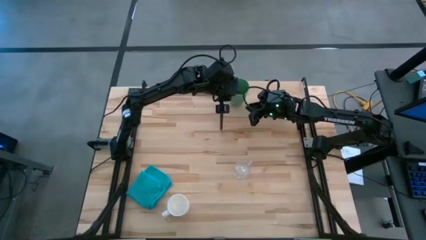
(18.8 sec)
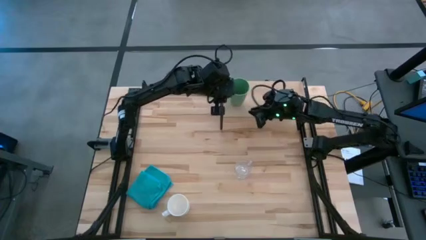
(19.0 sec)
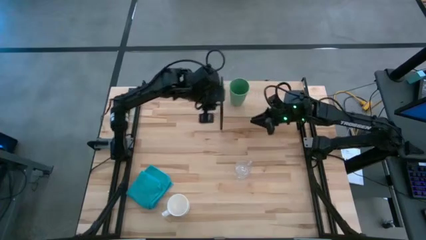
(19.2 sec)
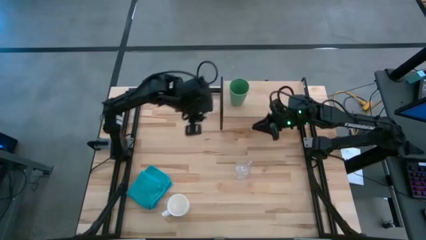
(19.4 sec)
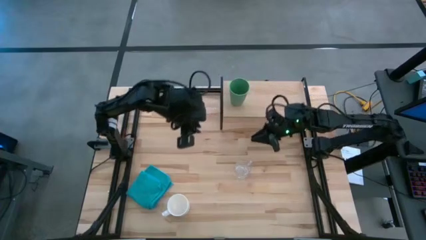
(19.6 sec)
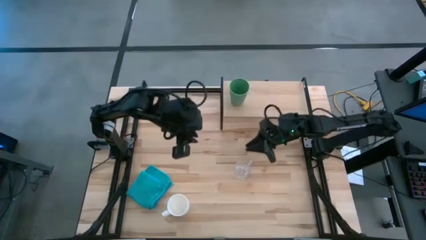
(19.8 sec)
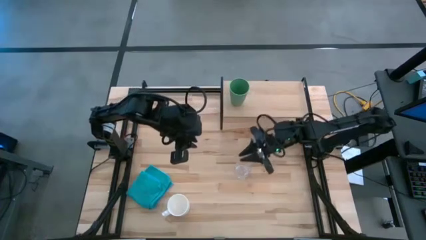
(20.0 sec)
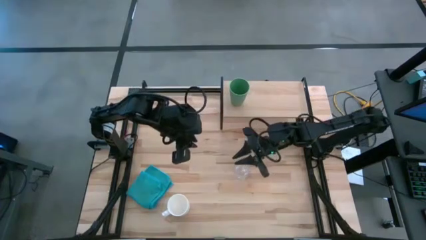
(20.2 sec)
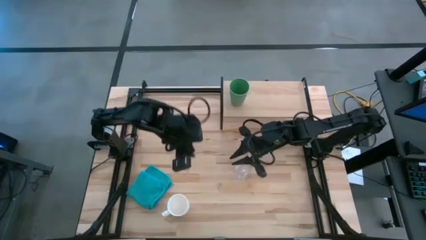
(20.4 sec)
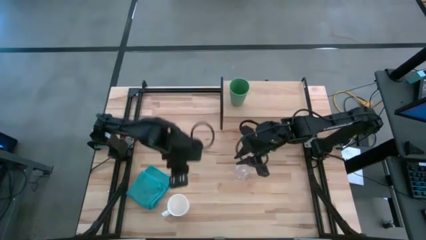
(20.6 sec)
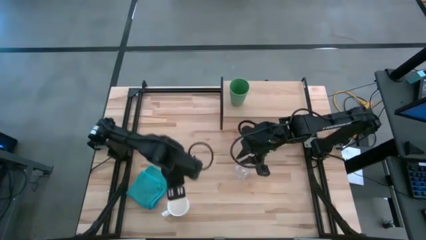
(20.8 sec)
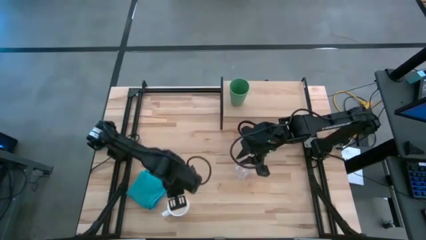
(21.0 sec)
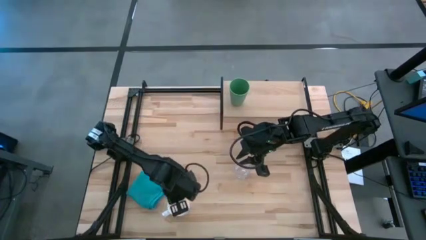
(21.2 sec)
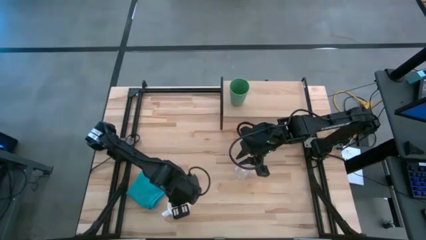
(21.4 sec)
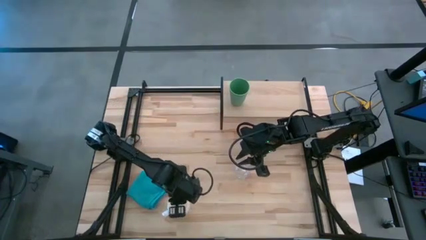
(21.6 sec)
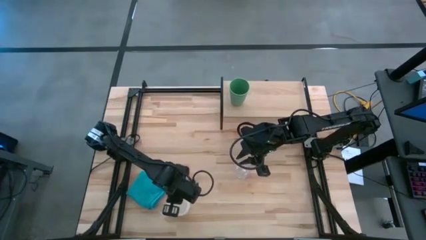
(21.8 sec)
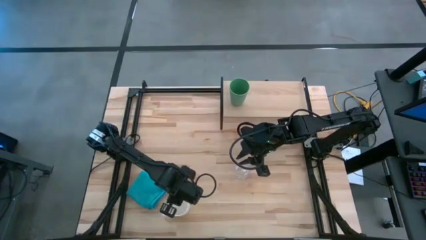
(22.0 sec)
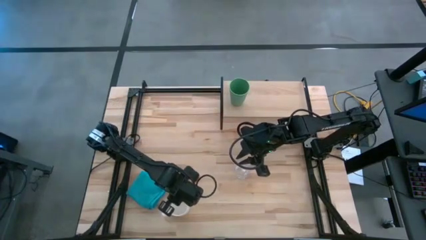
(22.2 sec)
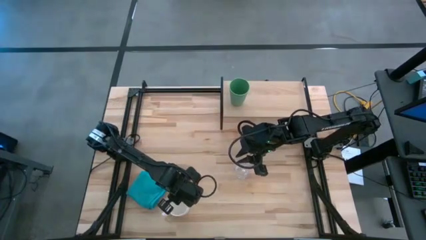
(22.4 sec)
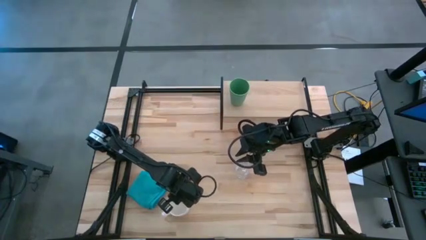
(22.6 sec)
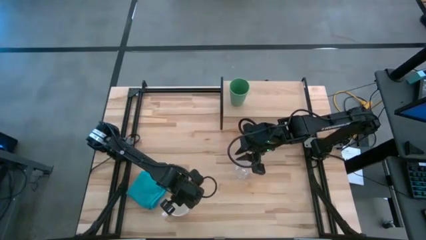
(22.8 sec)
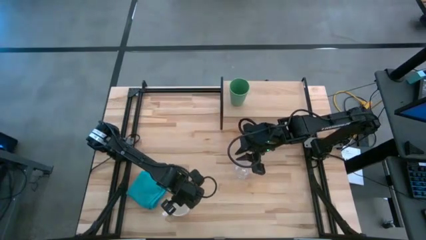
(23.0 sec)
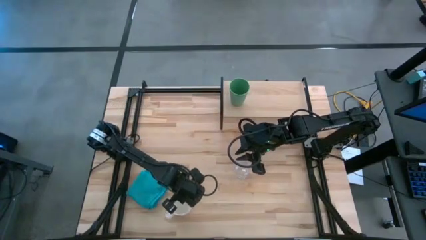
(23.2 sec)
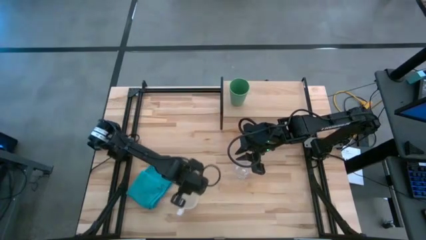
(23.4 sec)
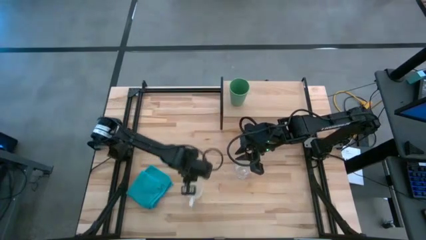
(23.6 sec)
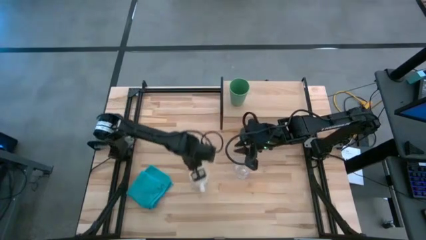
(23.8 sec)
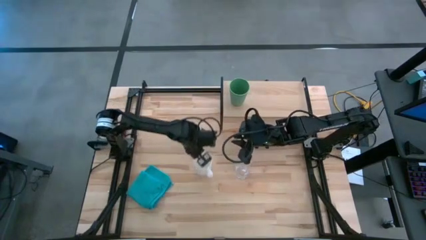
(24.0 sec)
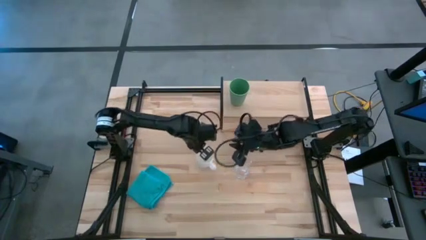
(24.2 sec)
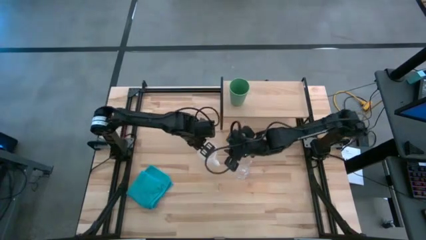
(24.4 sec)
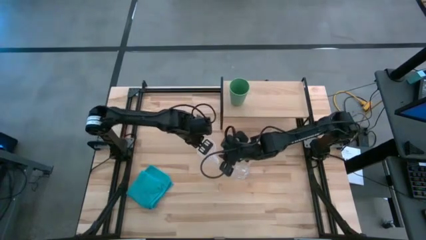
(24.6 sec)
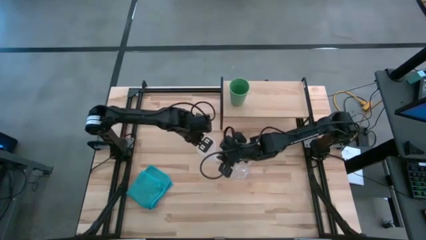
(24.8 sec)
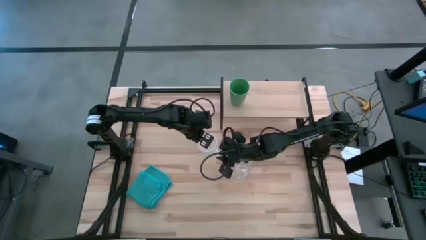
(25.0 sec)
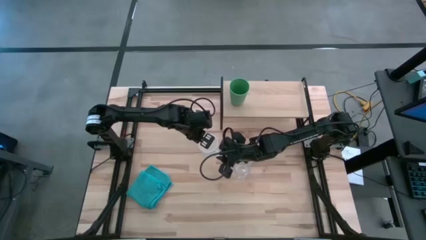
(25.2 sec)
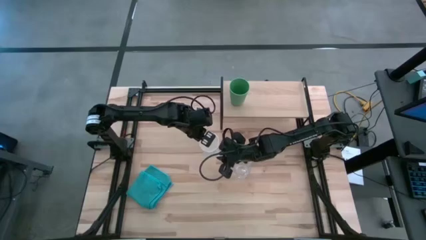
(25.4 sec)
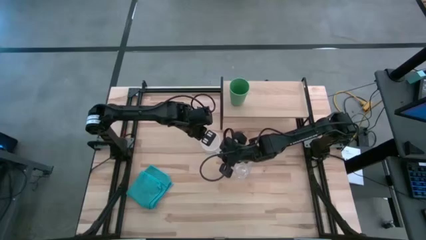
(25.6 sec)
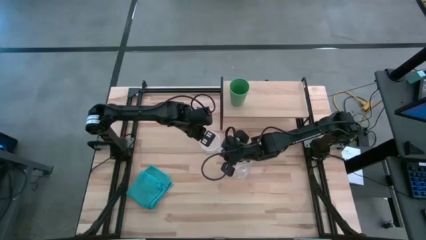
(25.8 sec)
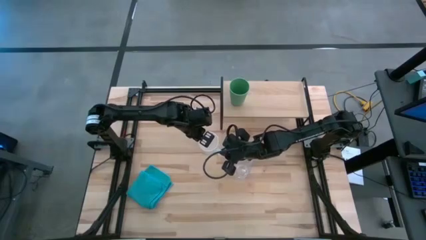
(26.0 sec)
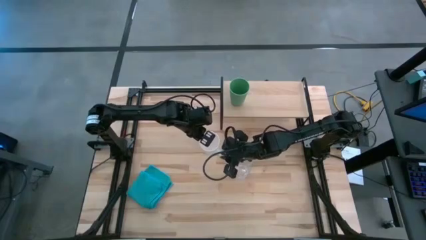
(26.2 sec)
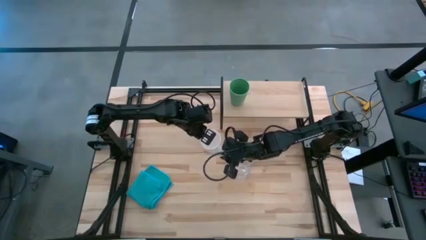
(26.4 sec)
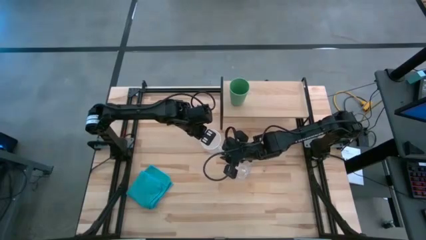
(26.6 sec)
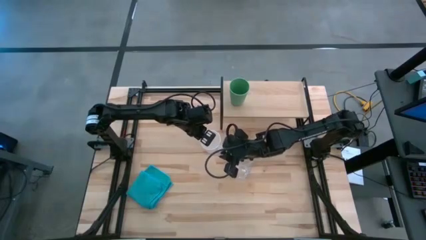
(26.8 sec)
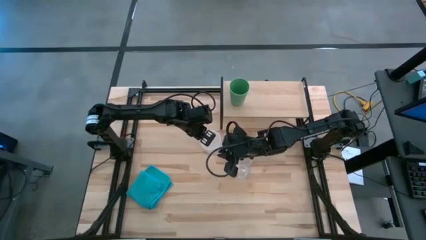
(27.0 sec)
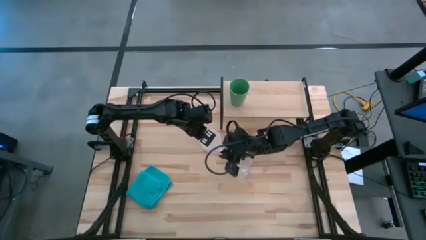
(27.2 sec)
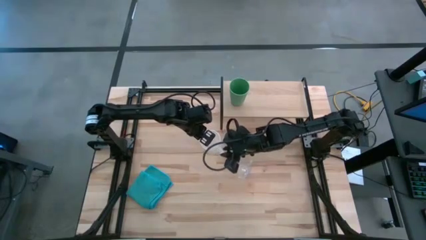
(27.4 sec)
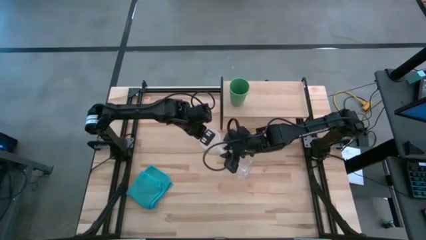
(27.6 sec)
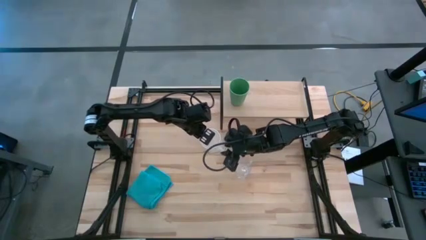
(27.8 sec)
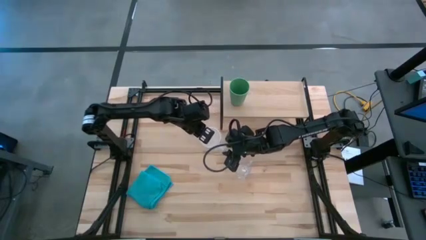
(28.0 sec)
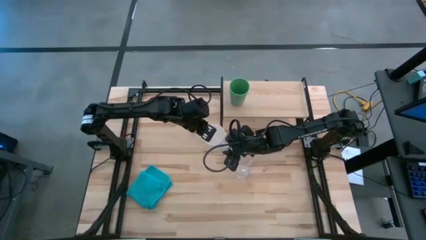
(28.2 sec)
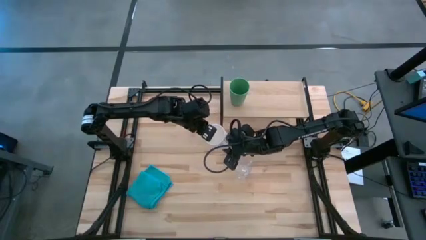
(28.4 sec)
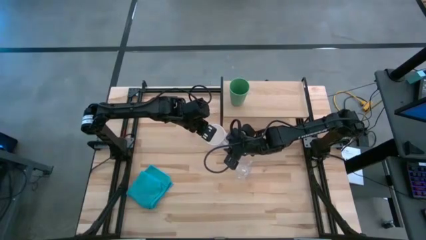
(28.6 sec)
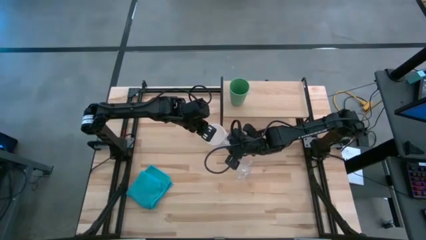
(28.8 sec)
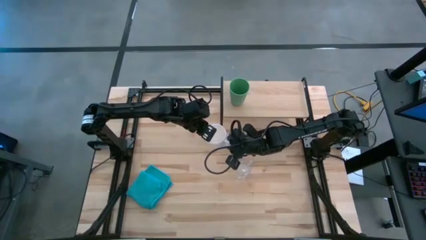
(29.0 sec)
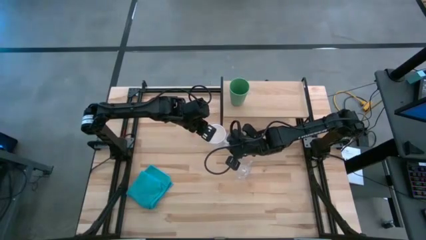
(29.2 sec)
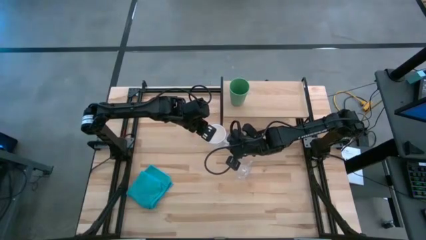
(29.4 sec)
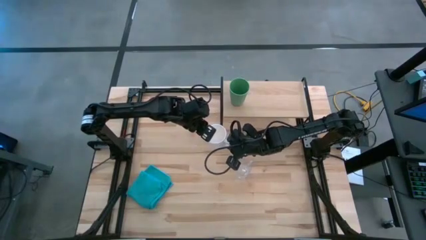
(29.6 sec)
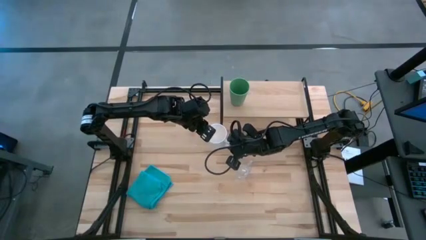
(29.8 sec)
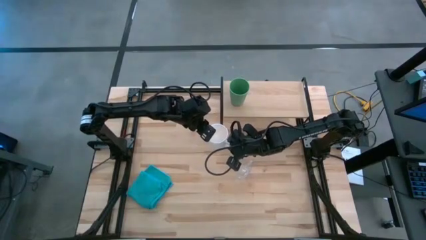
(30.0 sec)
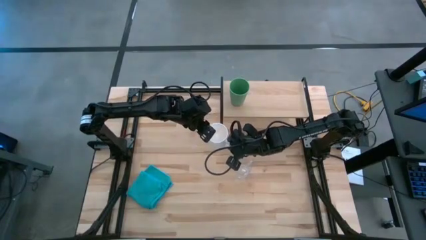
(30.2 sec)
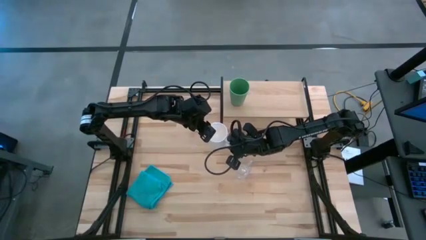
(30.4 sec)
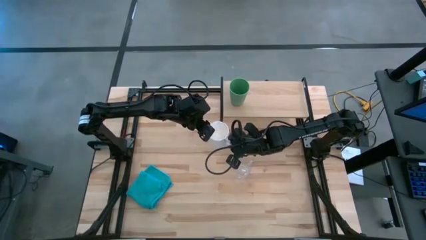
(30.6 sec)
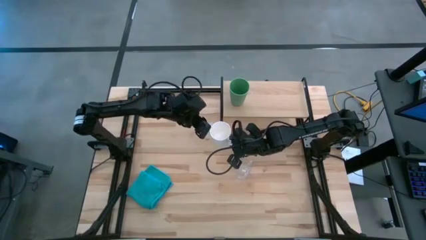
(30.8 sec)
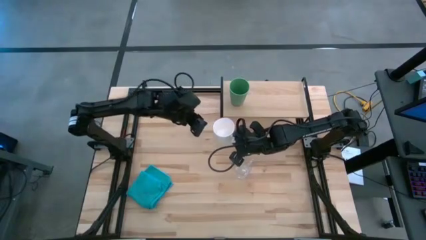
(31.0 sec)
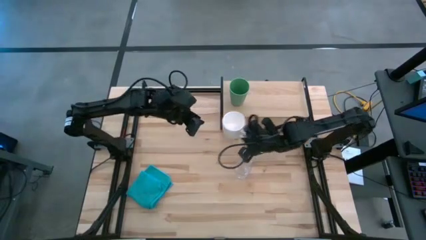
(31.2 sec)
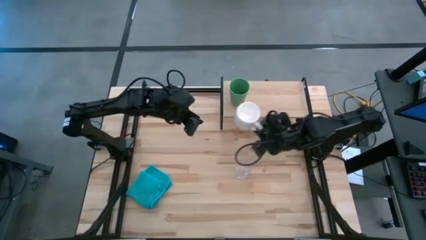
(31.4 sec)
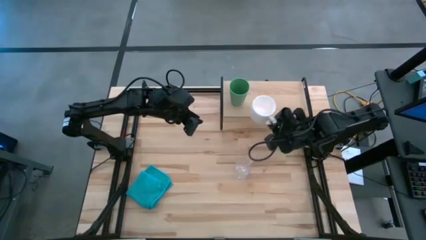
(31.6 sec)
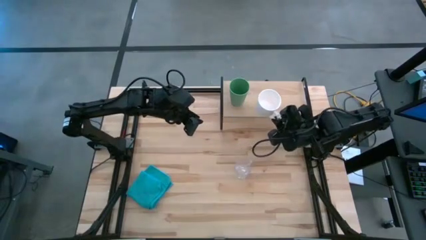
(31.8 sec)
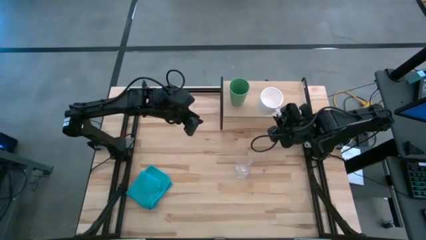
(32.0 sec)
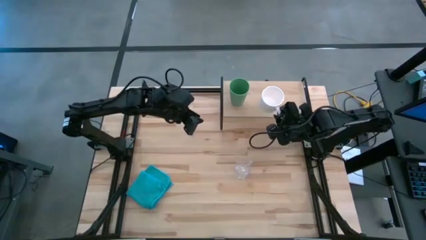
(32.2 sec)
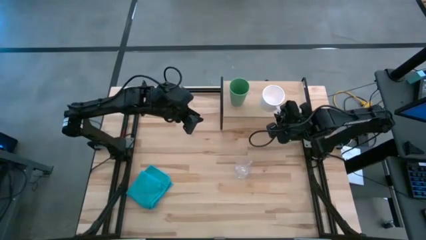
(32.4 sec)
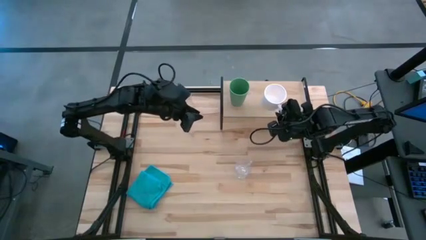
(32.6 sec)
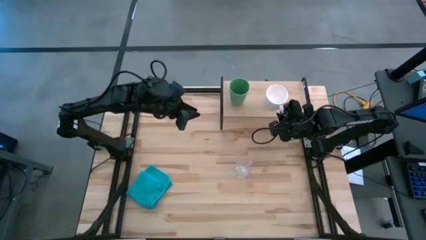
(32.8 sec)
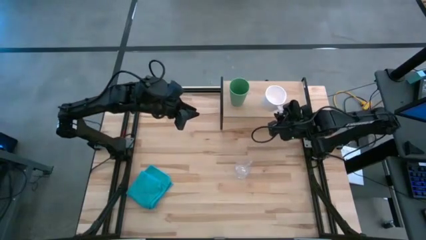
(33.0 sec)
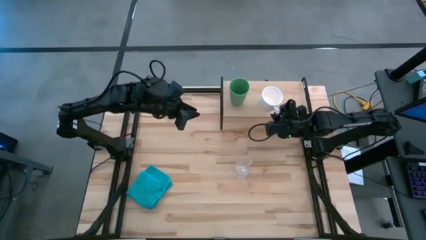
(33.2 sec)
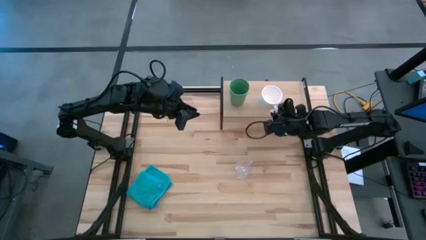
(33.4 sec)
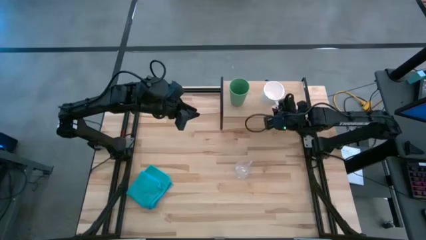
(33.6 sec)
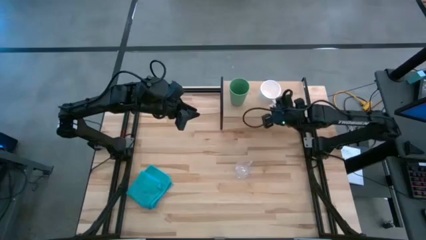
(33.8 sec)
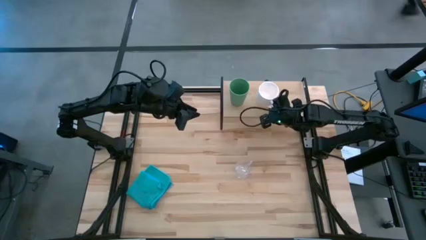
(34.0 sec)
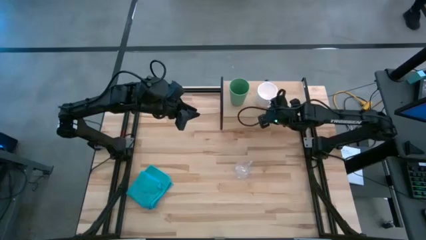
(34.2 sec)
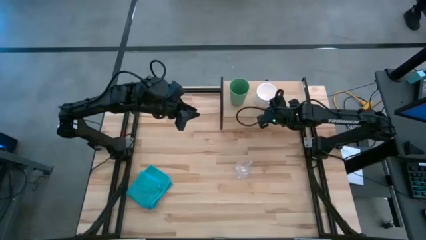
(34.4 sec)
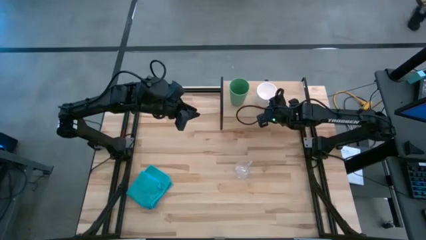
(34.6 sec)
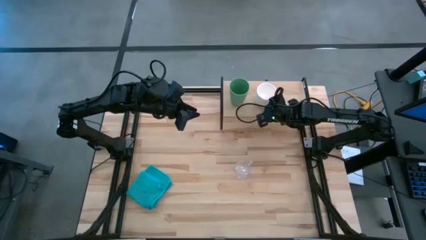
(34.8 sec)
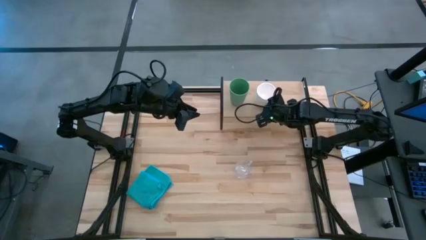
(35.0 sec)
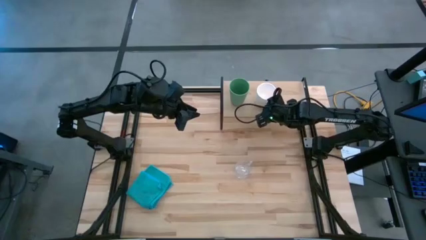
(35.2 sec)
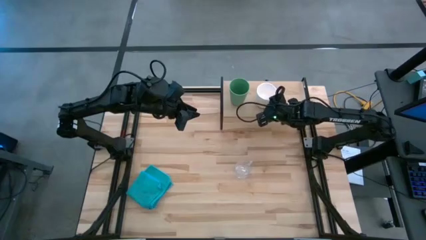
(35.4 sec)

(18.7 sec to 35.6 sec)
Task: Stack small to large cups/mugs on shelf
Put the white mug on the shelf
